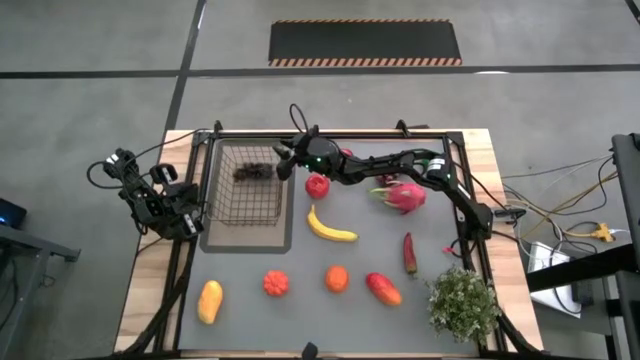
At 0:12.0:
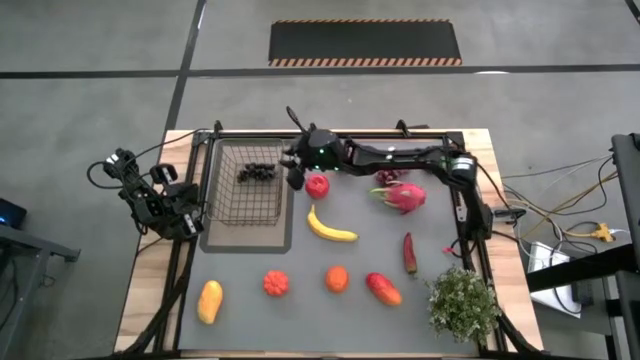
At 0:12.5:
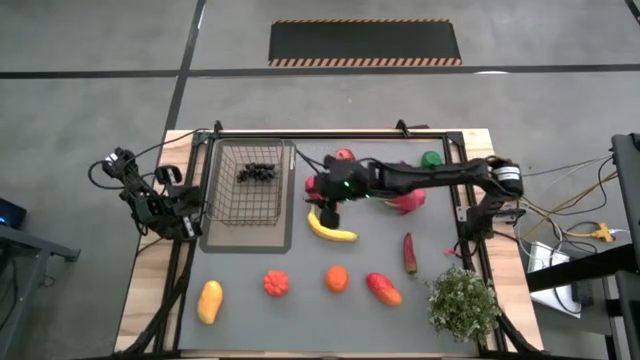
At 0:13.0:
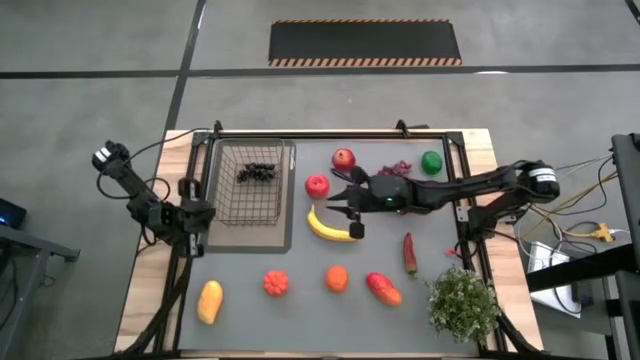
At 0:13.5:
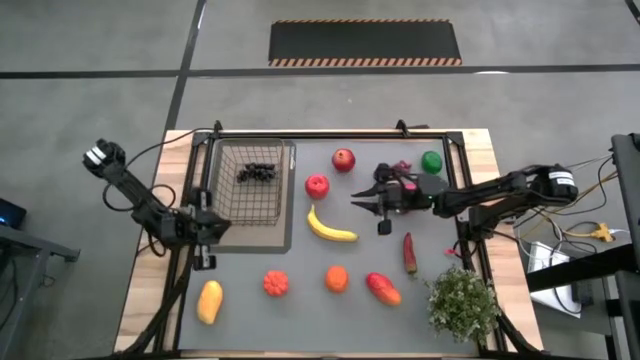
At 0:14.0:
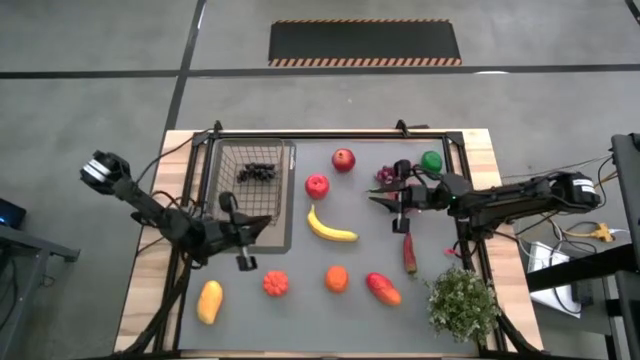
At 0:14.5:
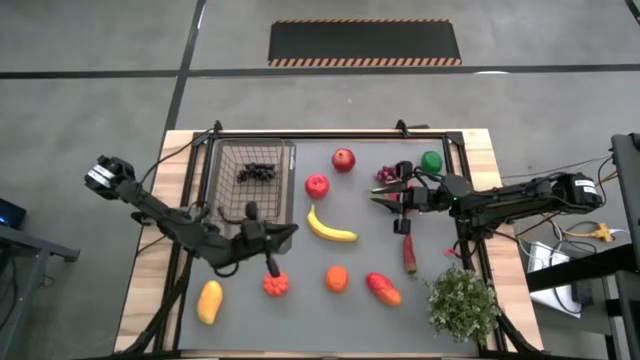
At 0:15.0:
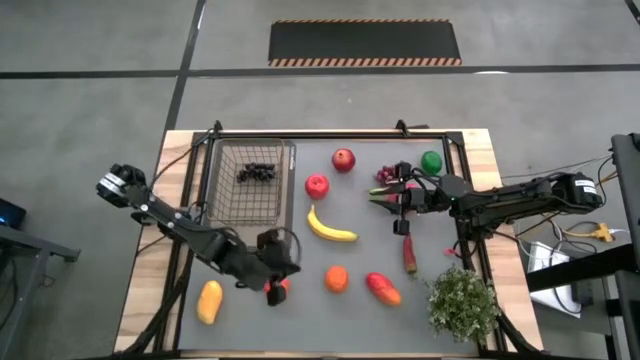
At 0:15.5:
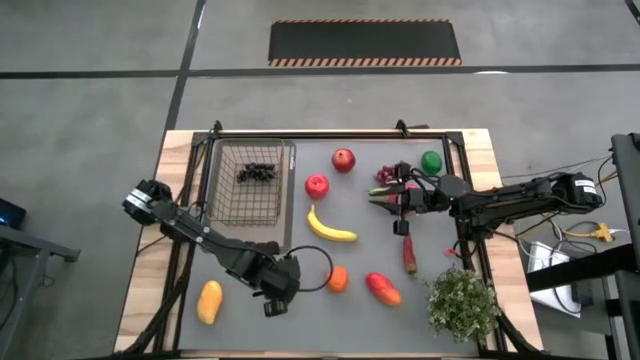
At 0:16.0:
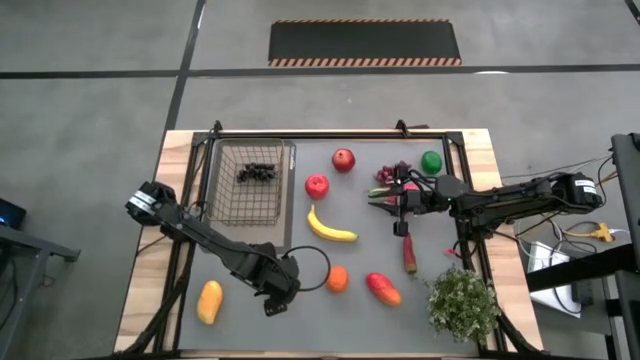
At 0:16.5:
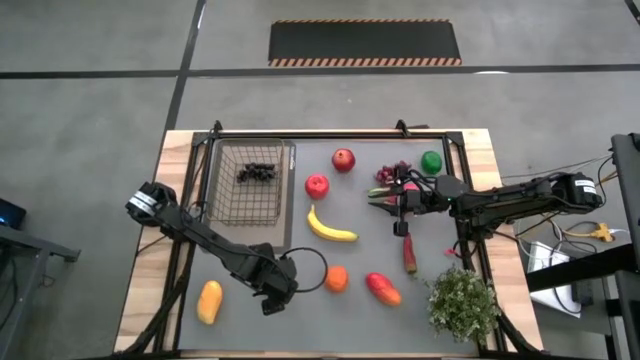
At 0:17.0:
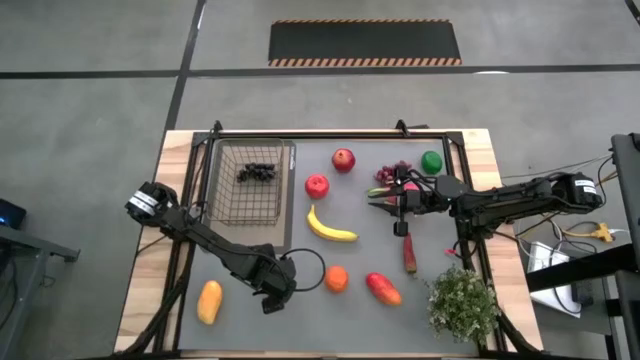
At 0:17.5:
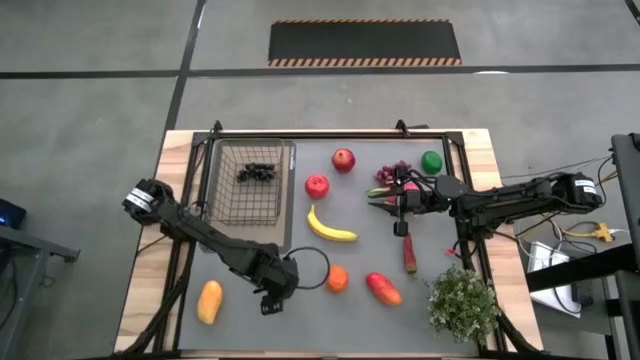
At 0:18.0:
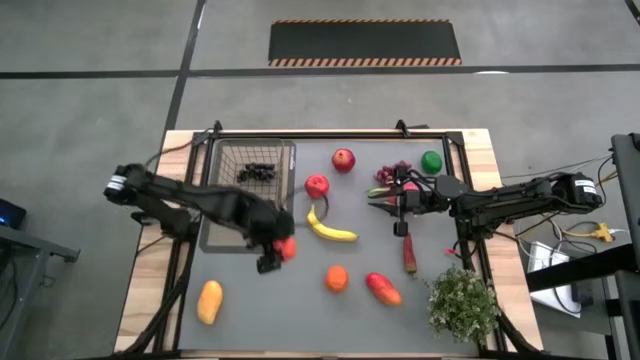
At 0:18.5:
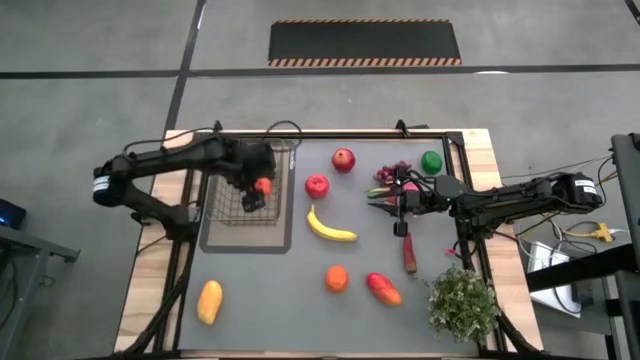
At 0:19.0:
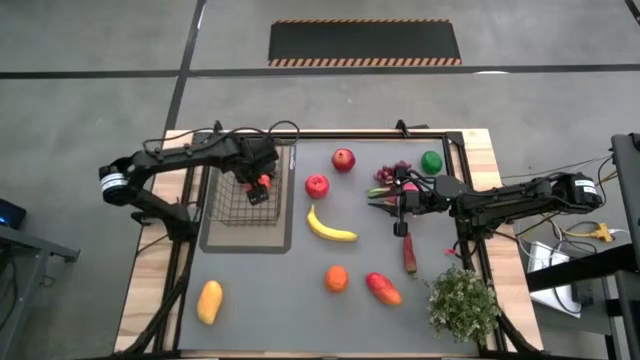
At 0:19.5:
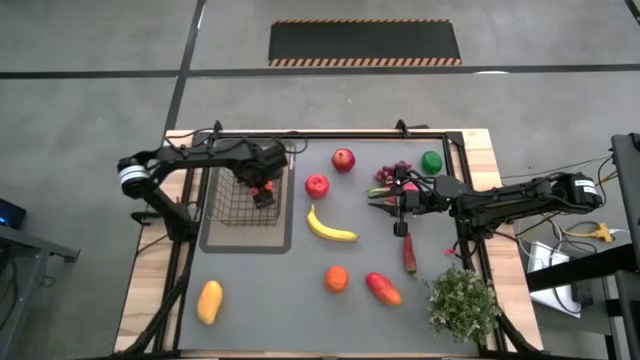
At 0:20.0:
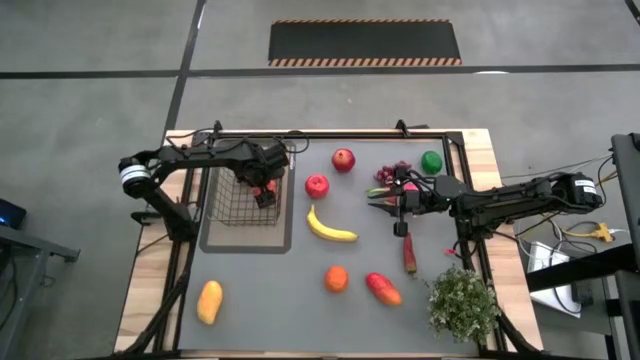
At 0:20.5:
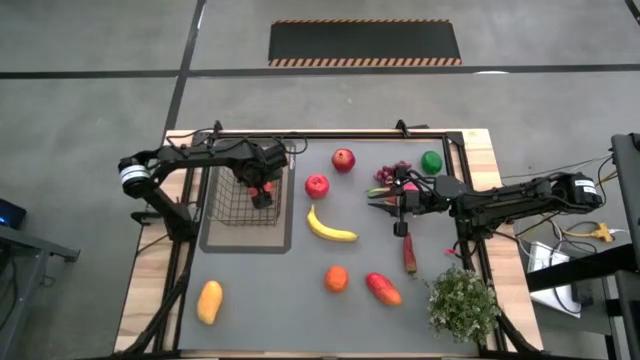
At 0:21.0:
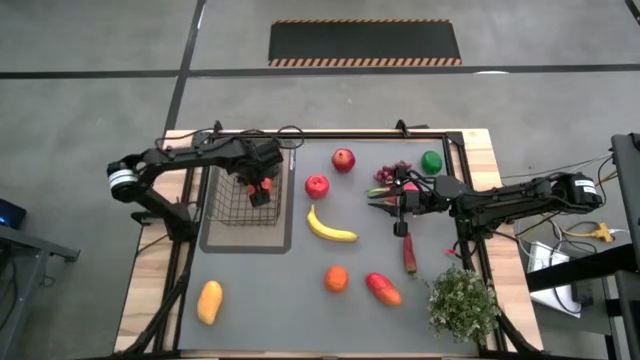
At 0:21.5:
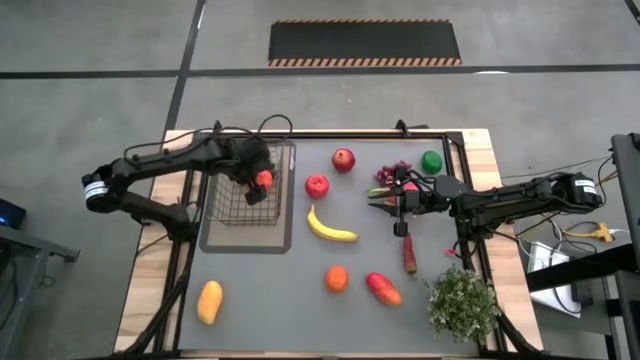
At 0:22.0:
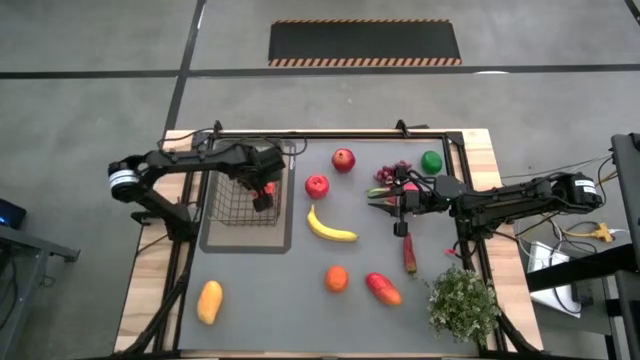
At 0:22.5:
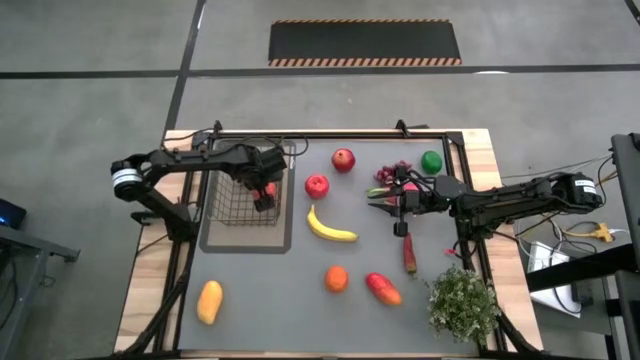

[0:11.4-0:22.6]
Task: Build produce basket
Put the orange pumpkin into the gold wire basket

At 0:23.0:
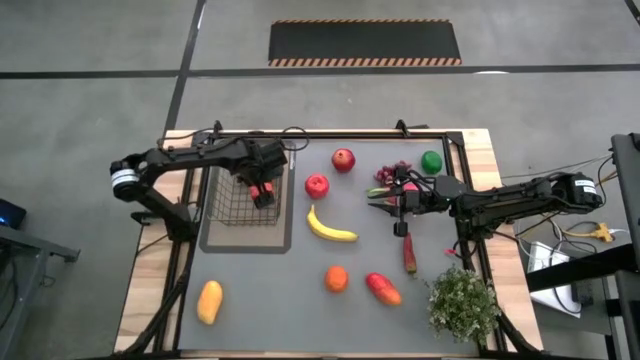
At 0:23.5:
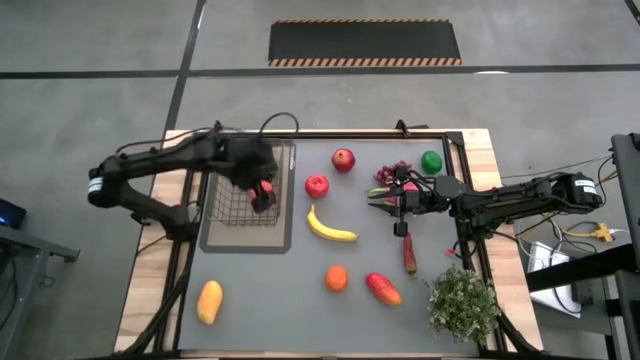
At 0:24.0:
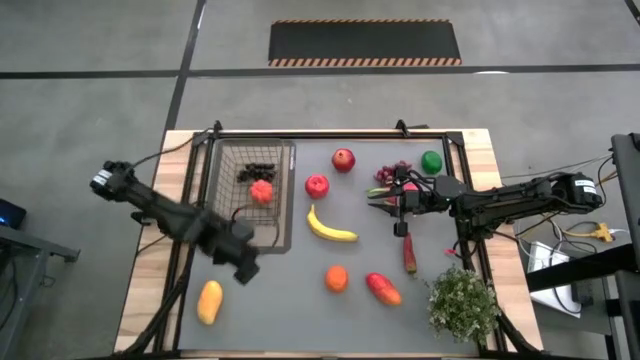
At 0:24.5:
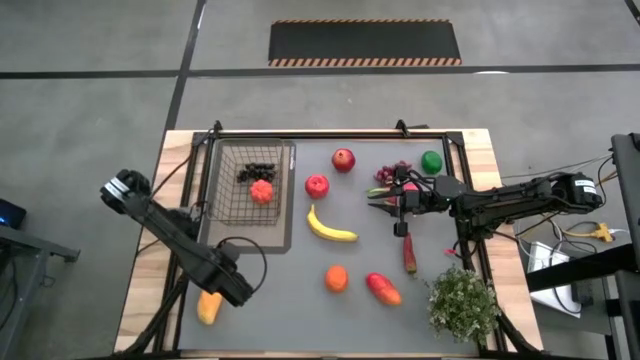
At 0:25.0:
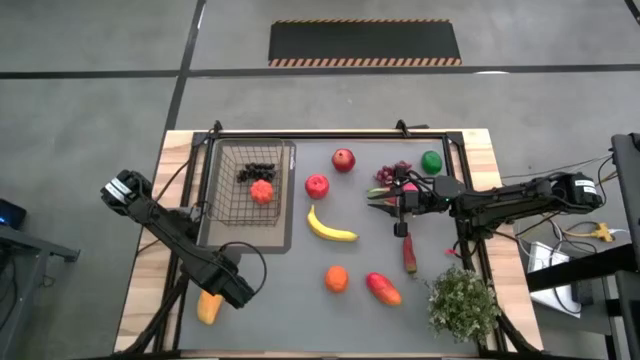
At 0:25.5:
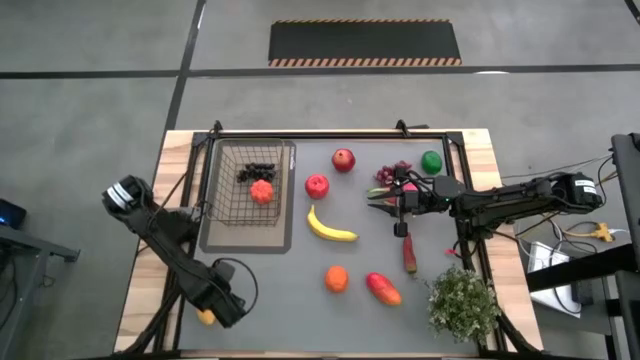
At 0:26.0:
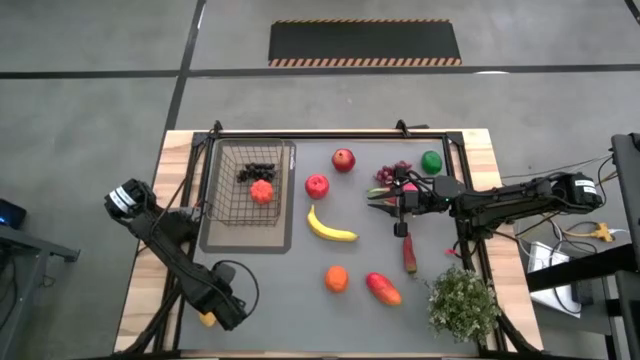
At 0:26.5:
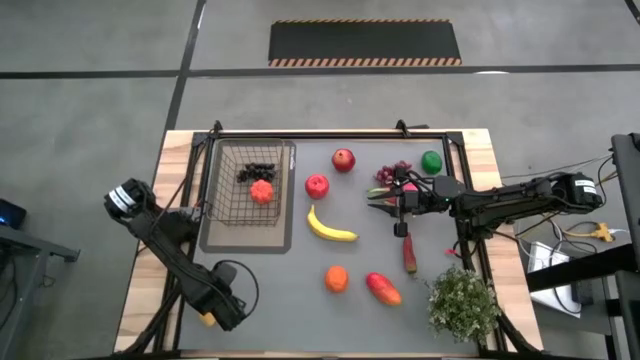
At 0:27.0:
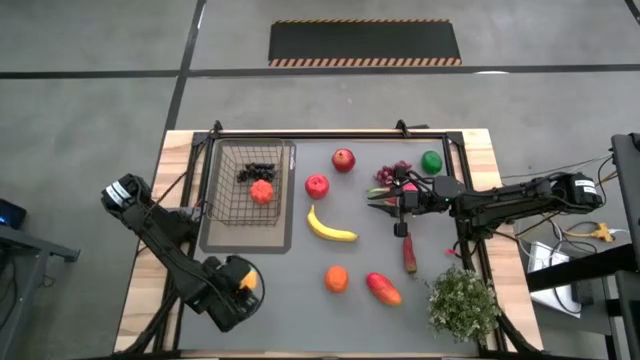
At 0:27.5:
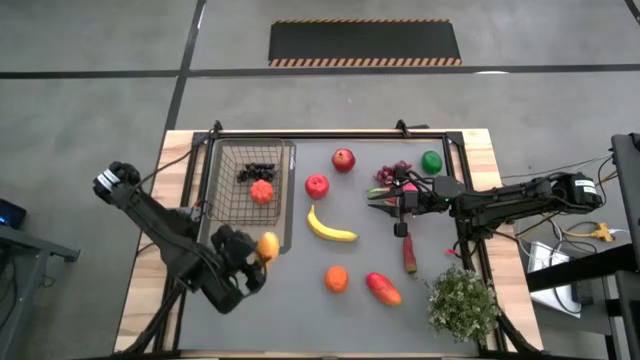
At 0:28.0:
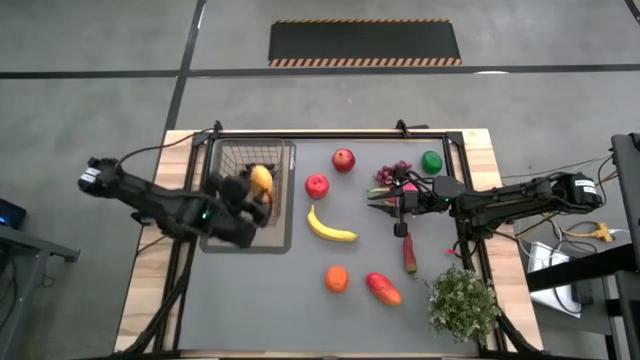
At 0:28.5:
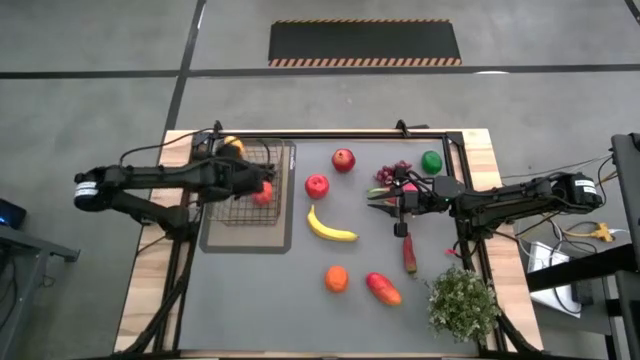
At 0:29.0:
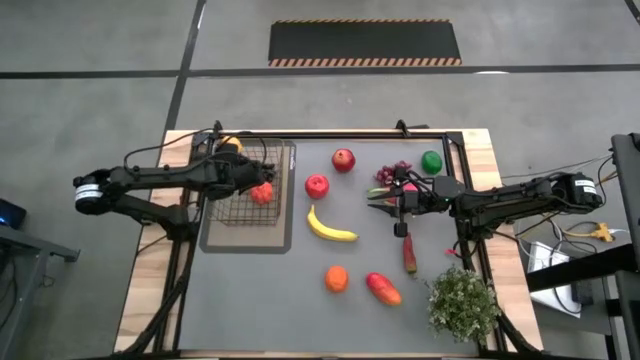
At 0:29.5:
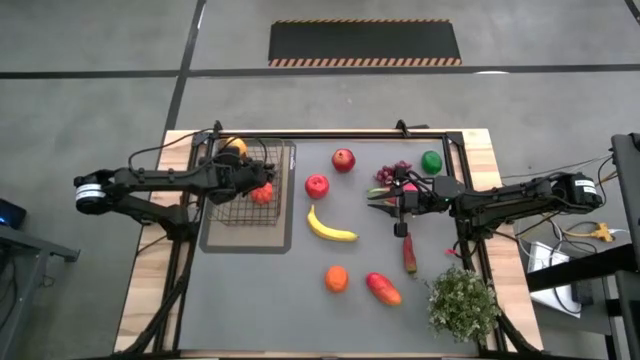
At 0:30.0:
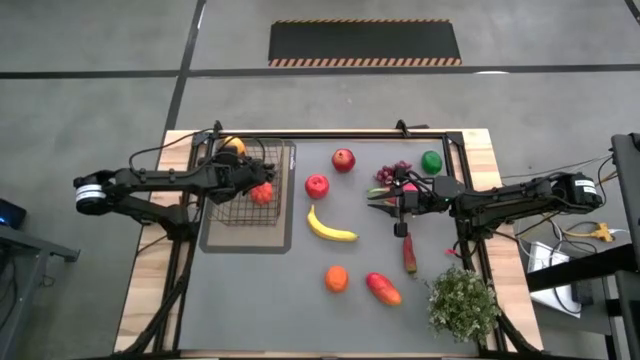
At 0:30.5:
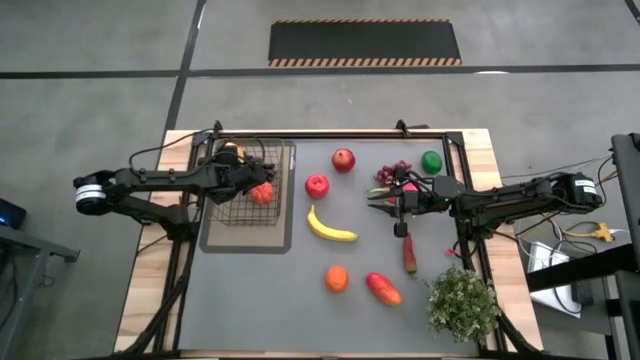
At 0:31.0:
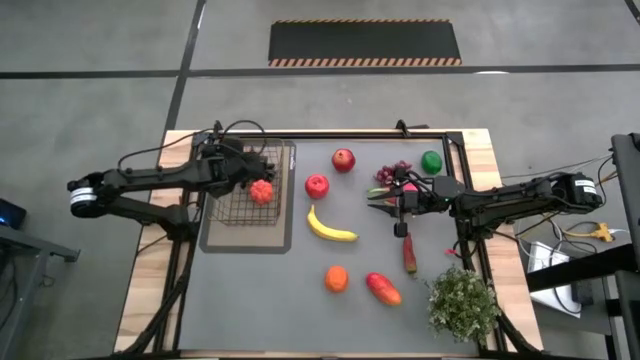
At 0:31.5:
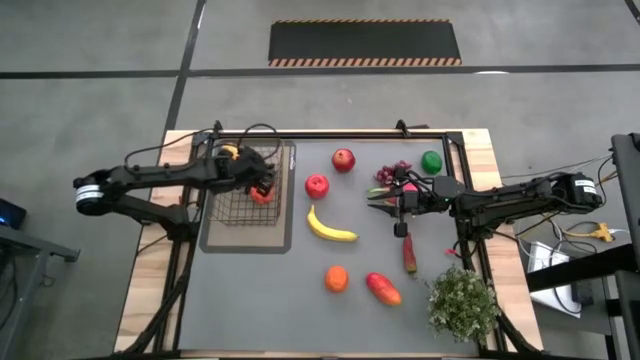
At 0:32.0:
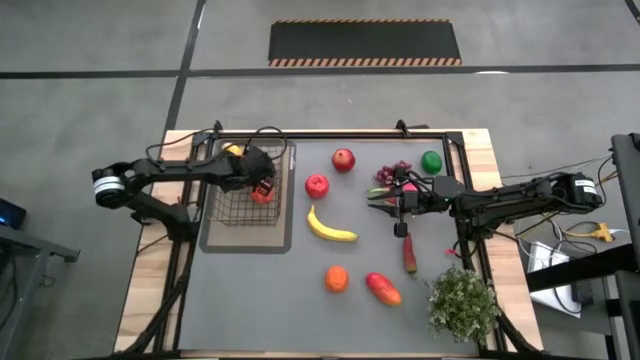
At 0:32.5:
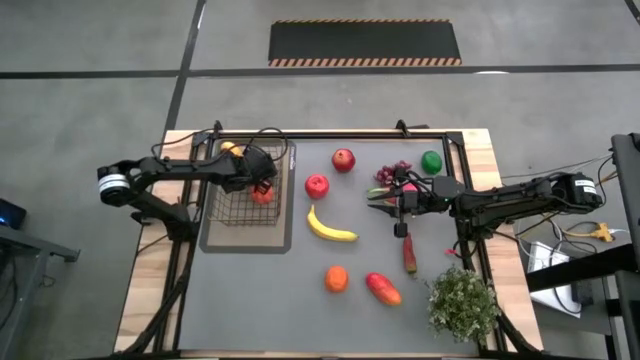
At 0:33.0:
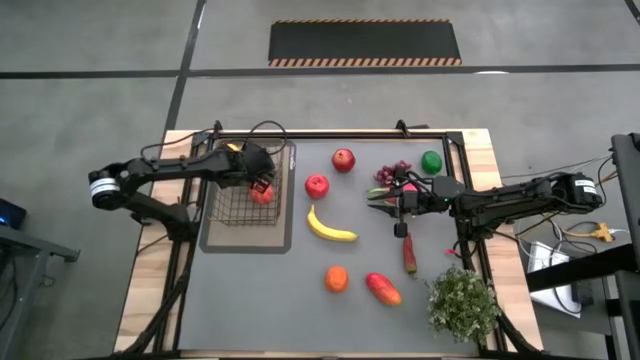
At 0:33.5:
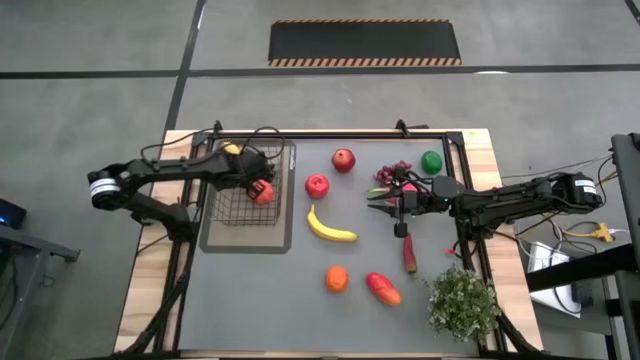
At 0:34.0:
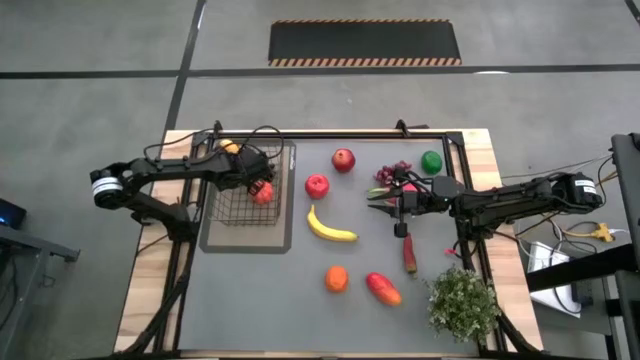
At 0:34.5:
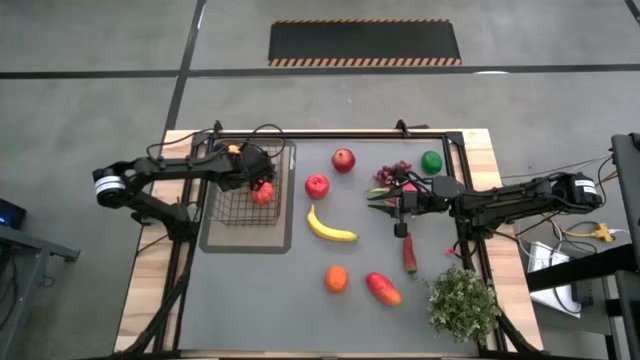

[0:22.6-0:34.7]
Put the yellow mango into the gold wire basket
